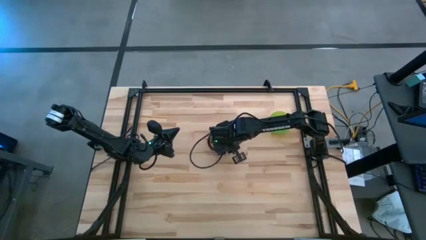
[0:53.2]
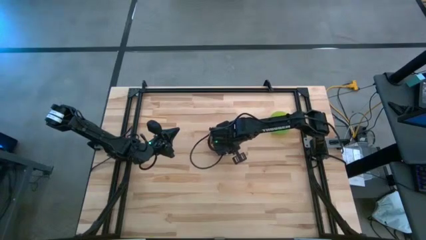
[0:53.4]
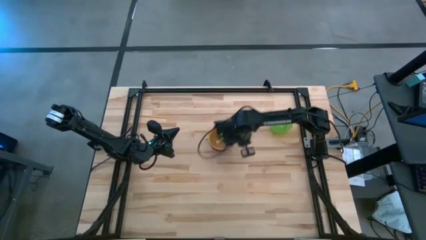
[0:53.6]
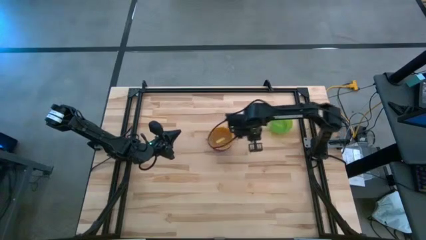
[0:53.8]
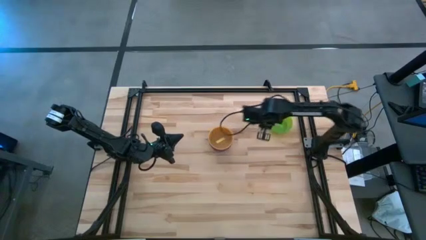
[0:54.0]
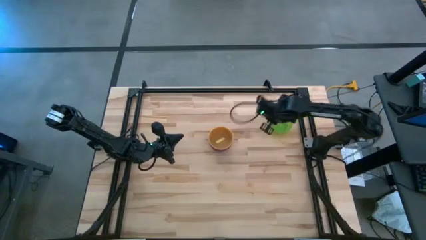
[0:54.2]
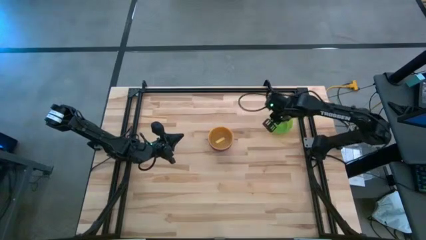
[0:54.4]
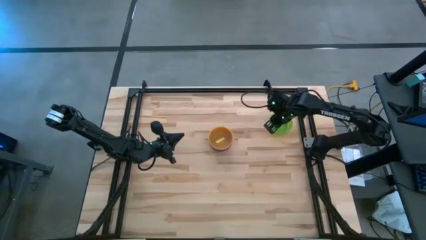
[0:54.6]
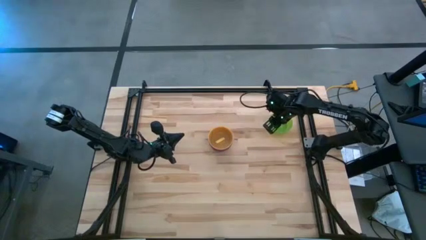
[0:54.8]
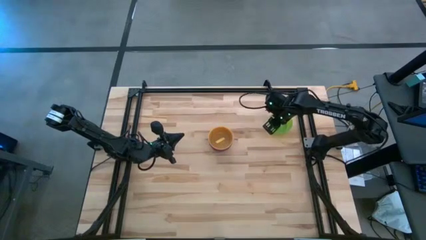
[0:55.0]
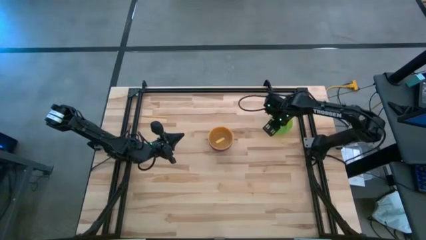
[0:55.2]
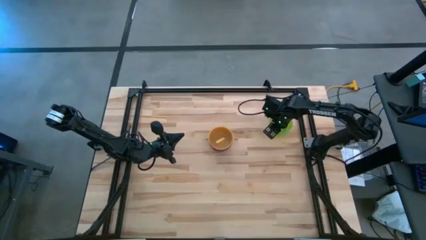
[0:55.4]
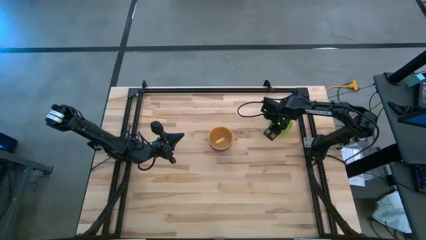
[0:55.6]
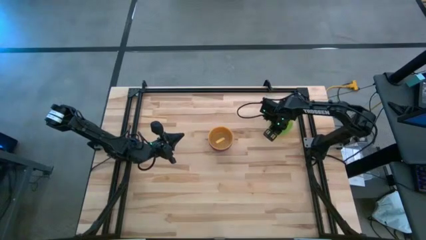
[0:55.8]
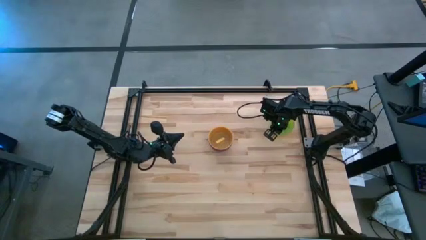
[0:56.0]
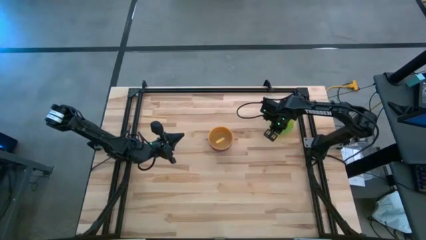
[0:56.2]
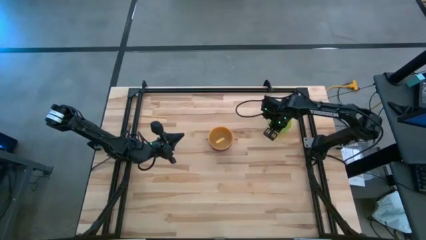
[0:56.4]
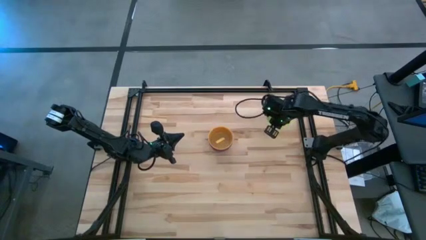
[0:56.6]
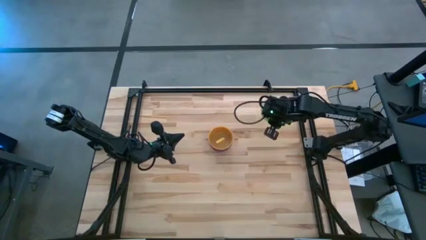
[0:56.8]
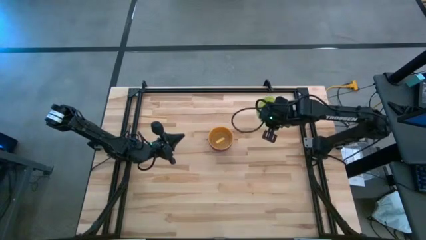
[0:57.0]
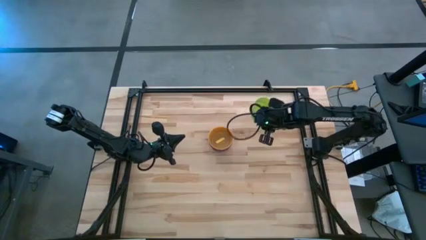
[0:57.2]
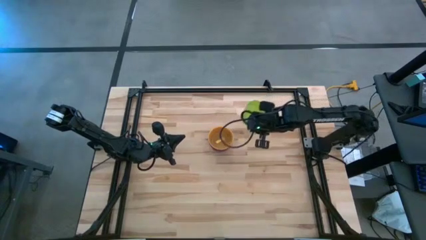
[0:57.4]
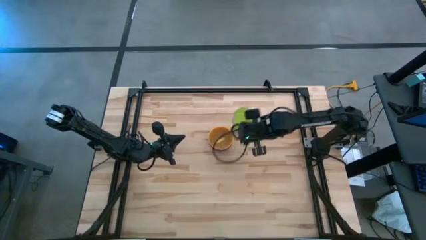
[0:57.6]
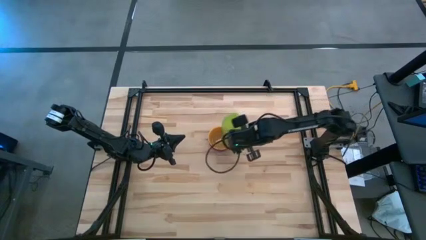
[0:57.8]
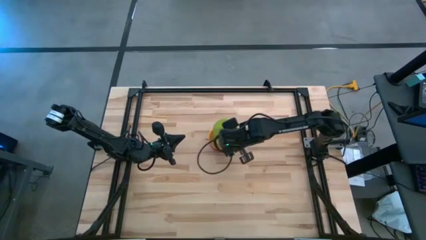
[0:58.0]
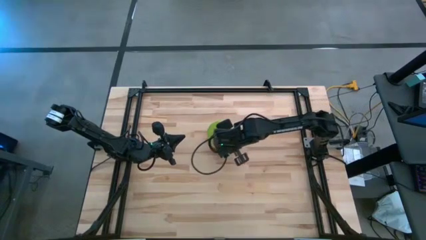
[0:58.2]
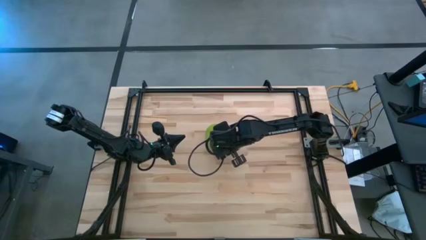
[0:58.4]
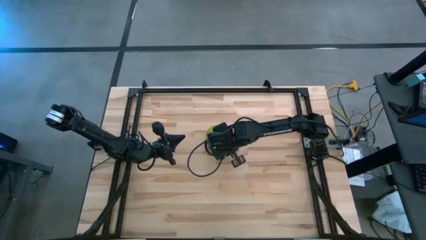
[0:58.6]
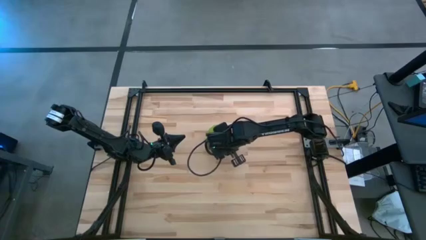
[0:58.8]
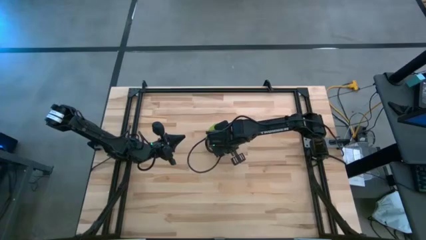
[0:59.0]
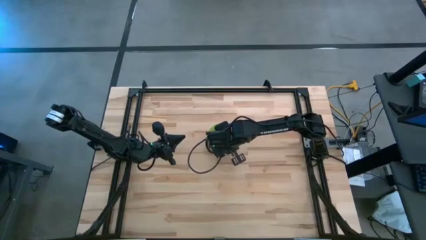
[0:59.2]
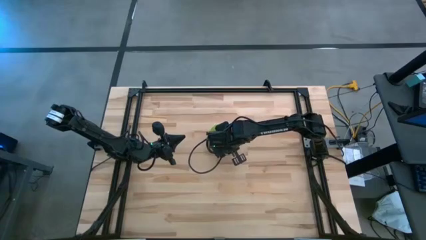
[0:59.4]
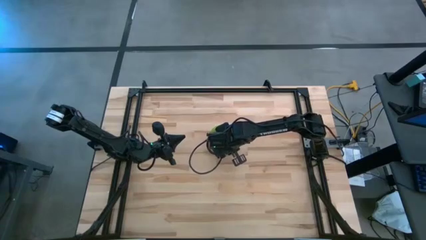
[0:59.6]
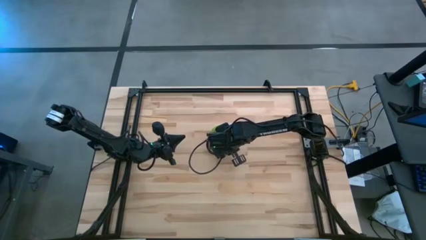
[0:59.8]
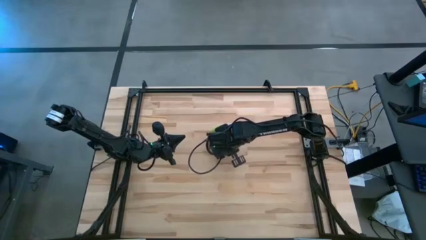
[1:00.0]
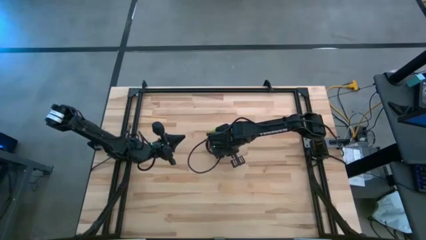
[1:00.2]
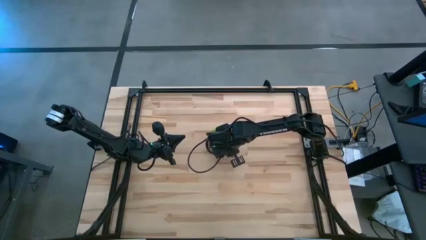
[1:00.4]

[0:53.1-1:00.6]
Task: Nest bowls inside each other
Stack the green bowl on top of the yellow bowl

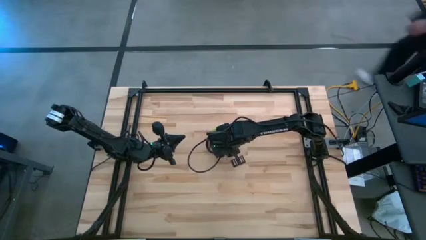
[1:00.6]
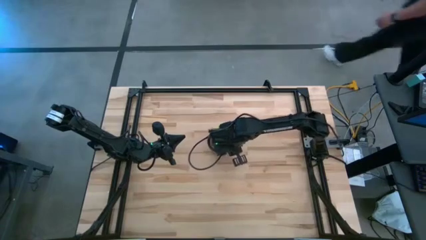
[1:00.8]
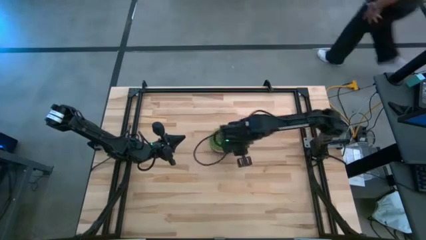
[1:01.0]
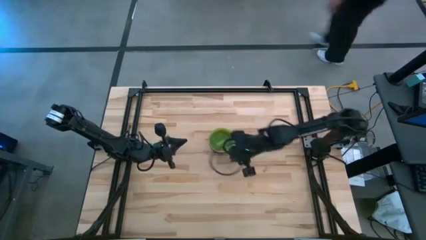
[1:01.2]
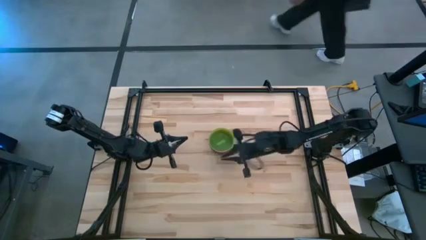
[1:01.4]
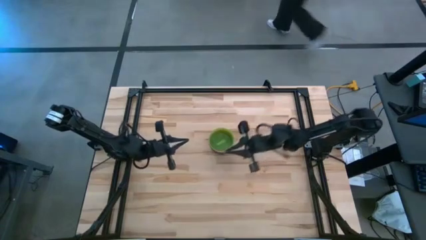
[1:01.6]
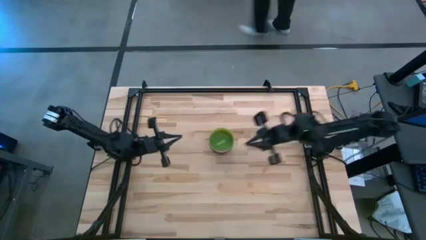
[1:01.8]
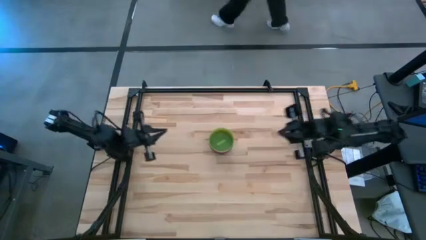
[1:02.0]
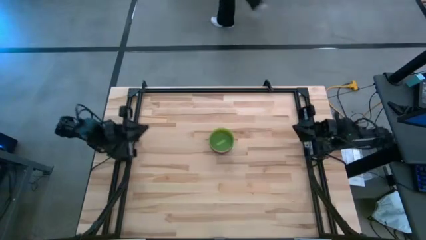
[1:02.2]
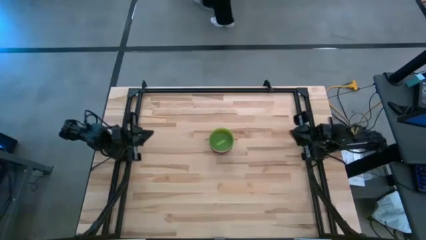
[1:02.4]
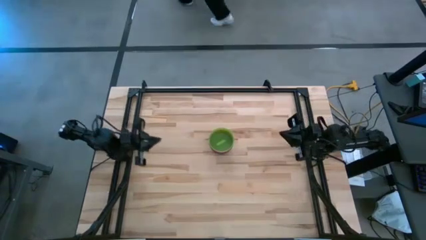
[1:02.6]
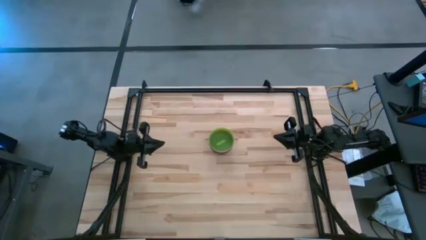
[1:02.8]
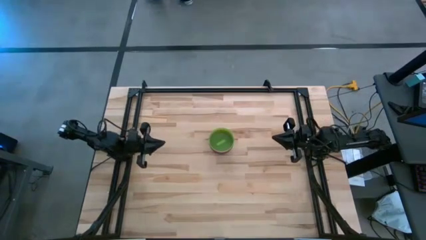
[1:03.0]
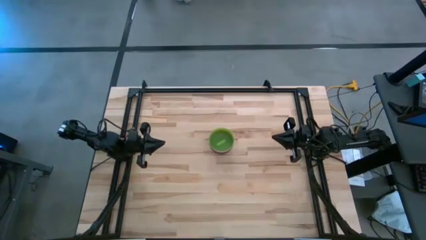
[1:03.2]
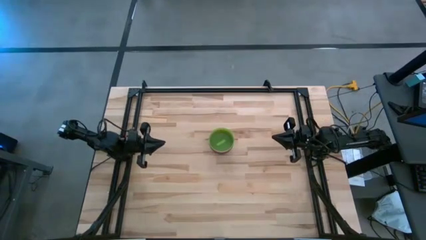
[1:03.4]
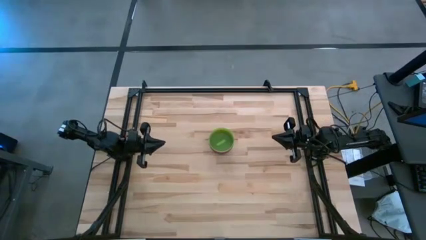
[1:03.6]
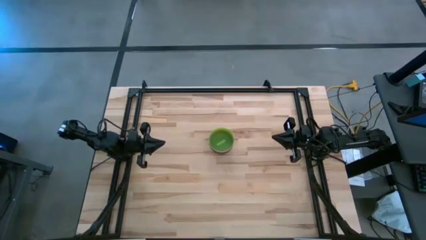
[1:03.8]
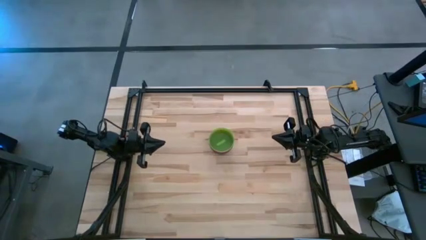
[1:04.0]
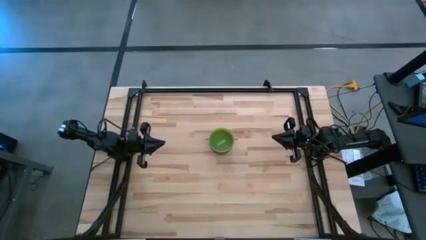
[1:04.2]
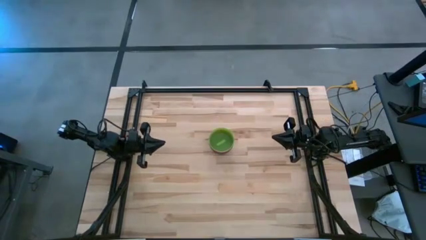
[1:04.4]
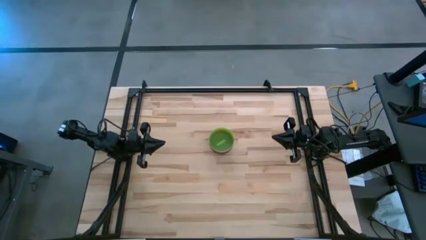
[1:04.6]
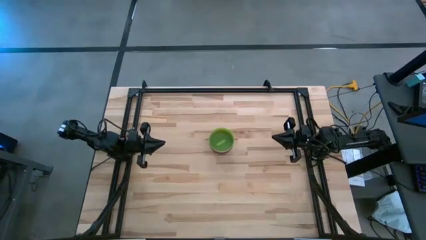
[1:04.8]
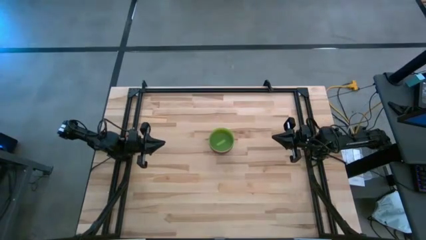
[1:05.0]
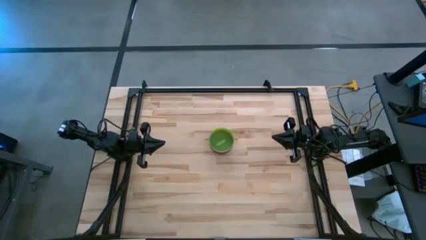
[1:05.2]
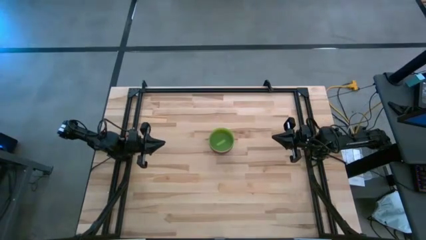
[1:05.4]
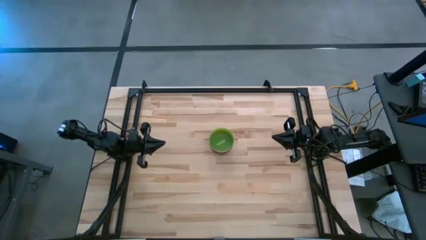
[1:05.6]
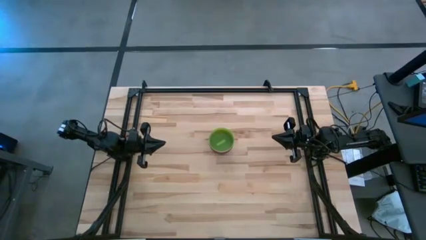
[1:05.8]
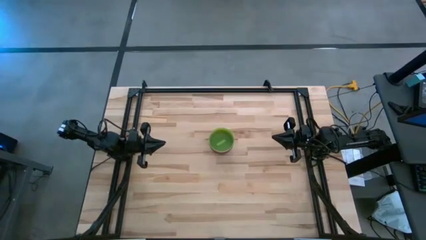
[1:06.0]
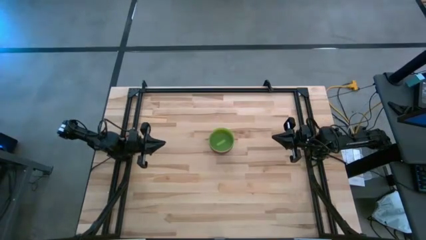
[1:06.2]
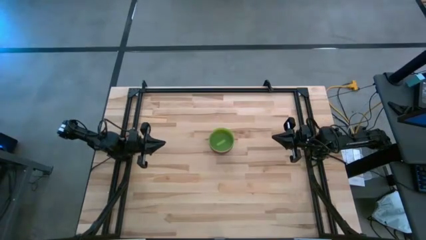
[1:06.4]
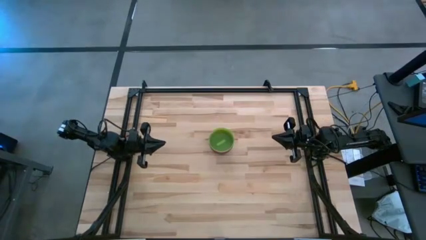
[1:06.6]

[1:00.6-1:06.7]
Return to Home Position
